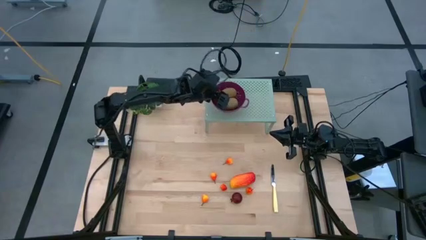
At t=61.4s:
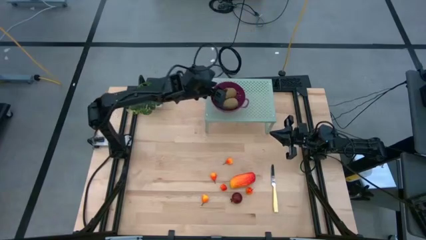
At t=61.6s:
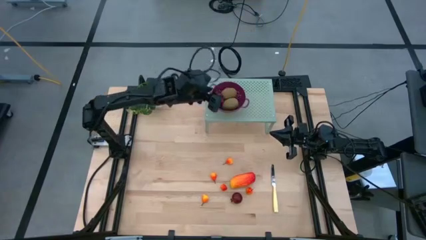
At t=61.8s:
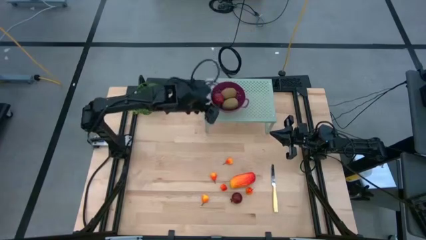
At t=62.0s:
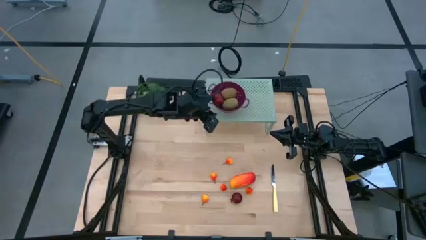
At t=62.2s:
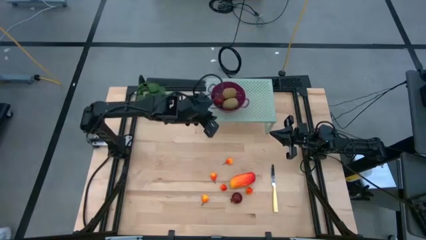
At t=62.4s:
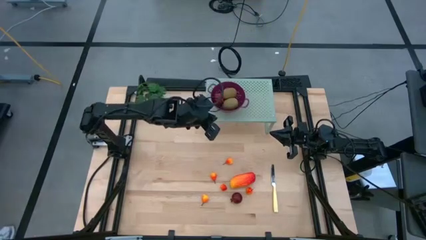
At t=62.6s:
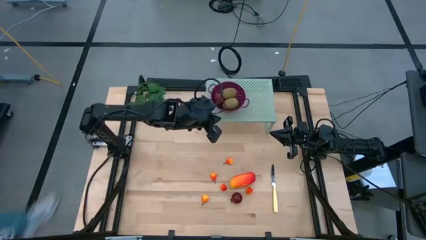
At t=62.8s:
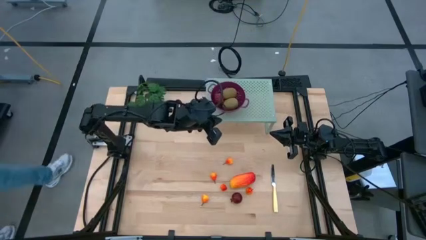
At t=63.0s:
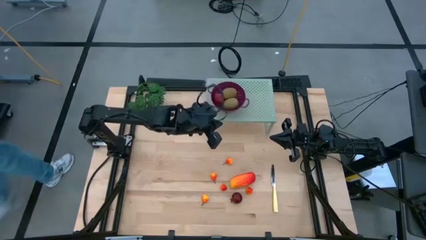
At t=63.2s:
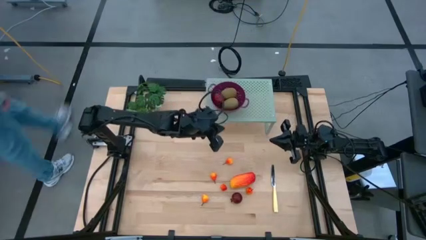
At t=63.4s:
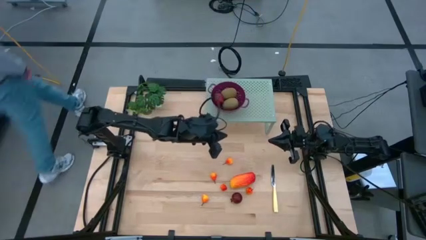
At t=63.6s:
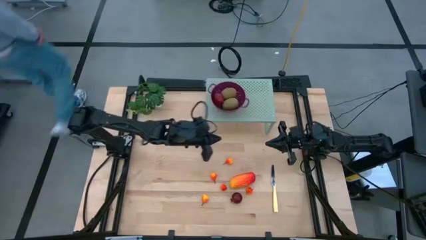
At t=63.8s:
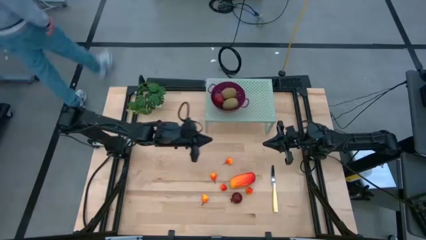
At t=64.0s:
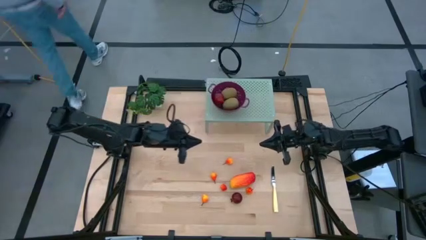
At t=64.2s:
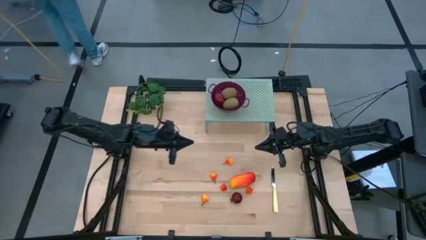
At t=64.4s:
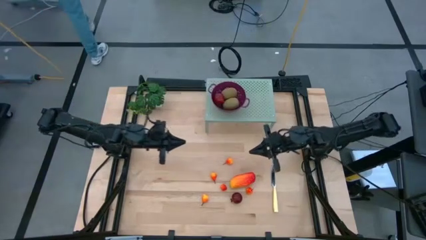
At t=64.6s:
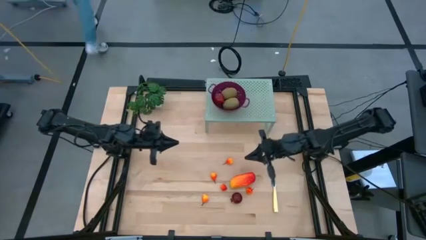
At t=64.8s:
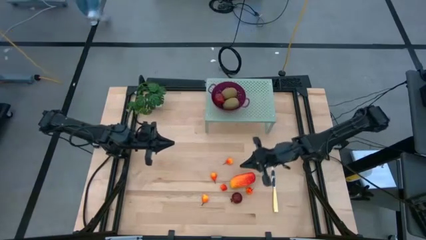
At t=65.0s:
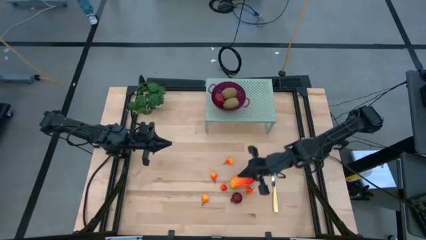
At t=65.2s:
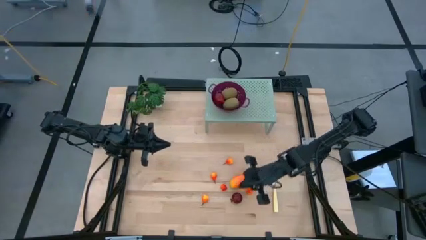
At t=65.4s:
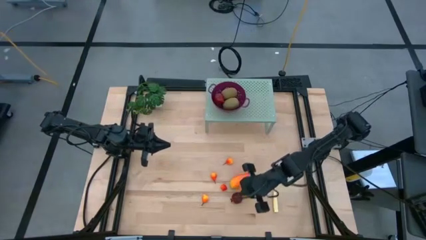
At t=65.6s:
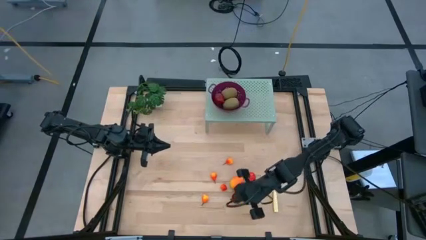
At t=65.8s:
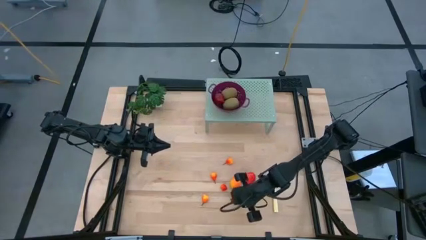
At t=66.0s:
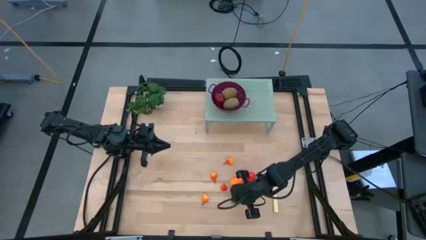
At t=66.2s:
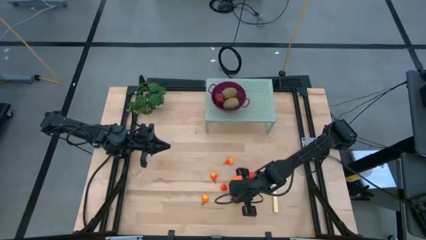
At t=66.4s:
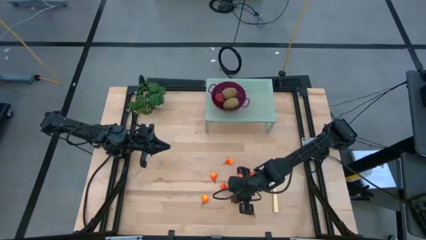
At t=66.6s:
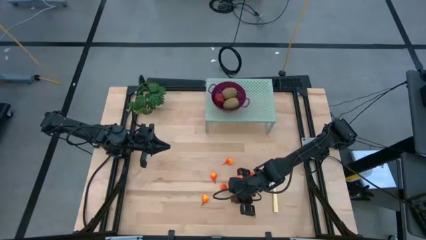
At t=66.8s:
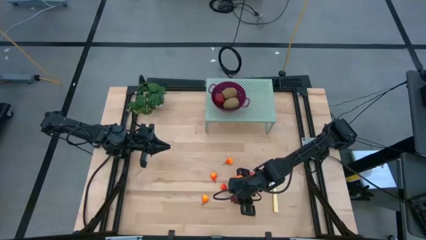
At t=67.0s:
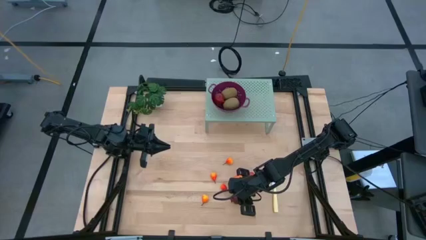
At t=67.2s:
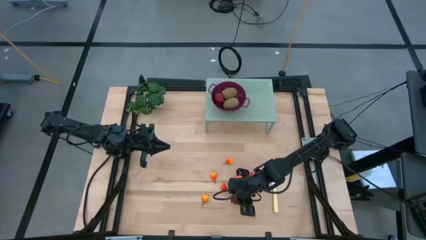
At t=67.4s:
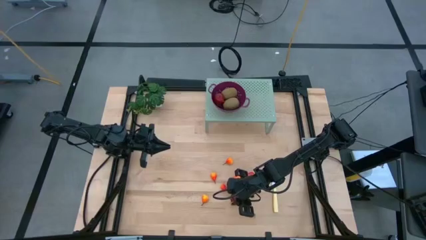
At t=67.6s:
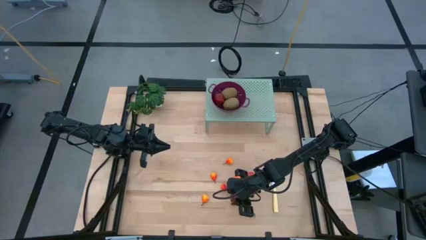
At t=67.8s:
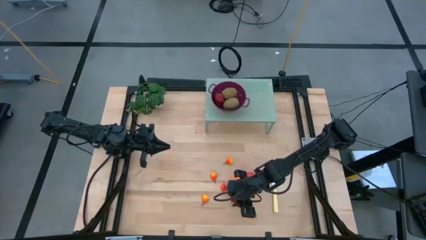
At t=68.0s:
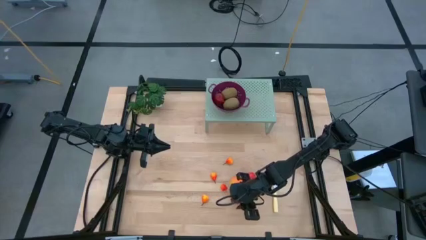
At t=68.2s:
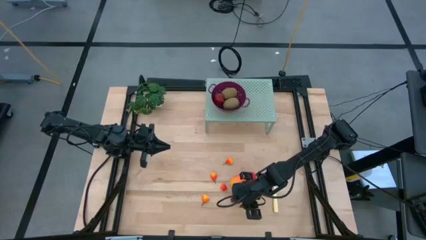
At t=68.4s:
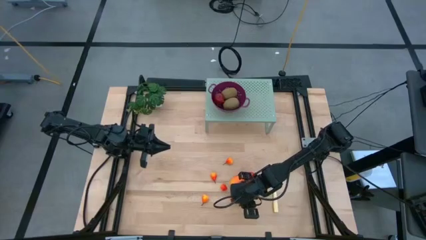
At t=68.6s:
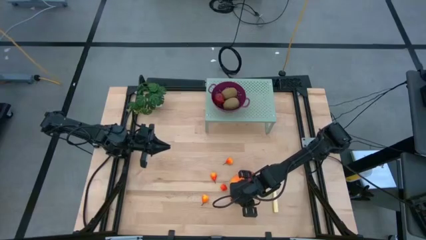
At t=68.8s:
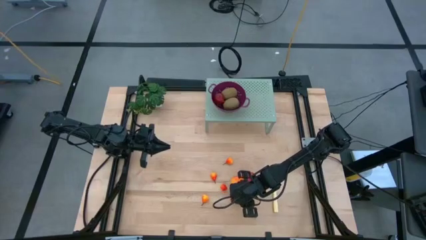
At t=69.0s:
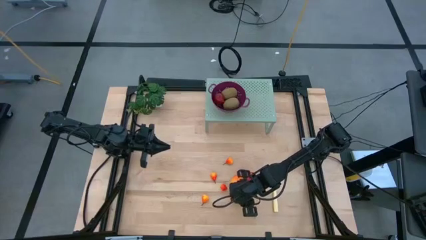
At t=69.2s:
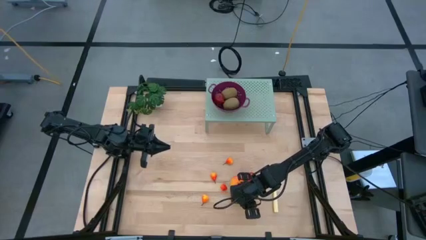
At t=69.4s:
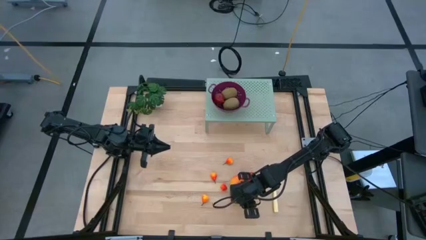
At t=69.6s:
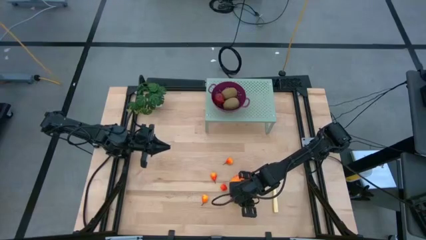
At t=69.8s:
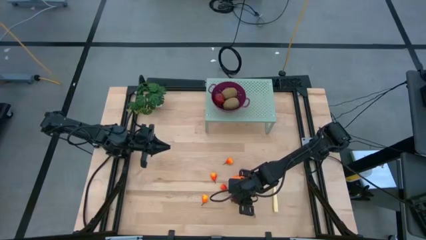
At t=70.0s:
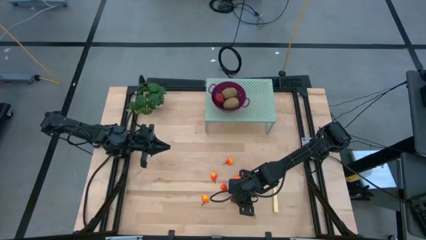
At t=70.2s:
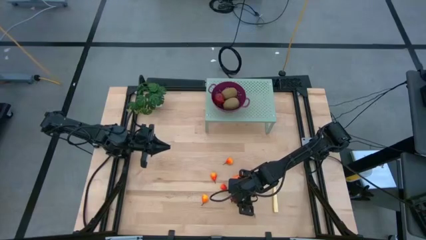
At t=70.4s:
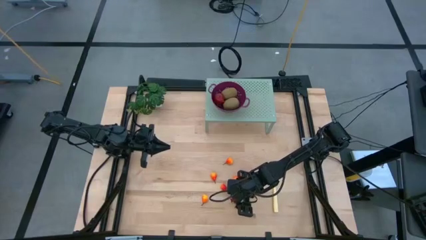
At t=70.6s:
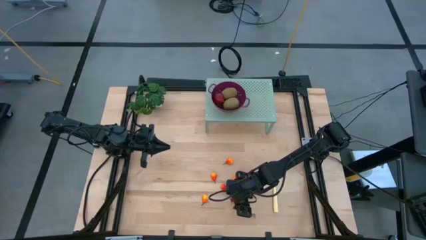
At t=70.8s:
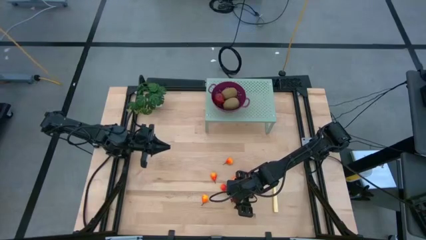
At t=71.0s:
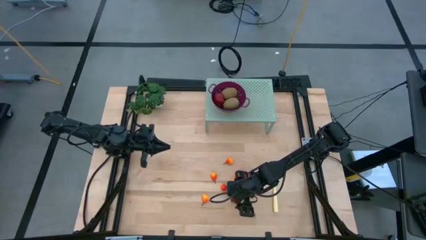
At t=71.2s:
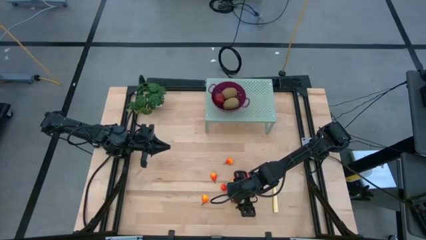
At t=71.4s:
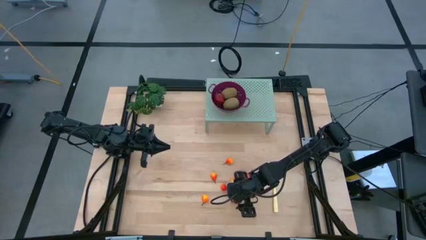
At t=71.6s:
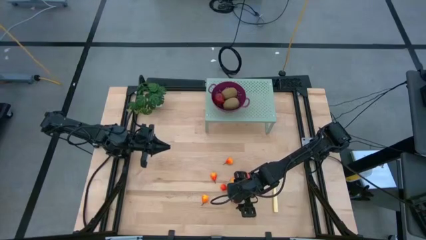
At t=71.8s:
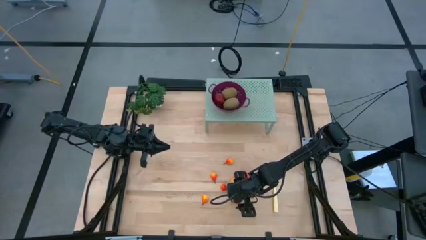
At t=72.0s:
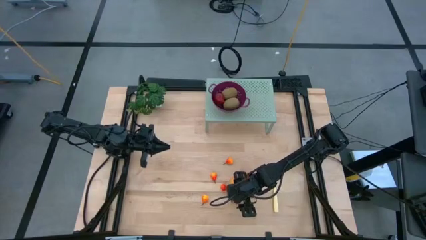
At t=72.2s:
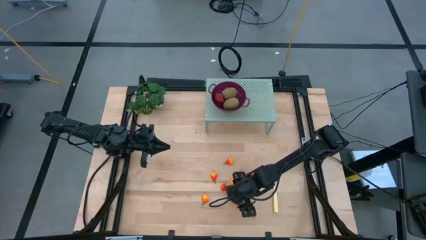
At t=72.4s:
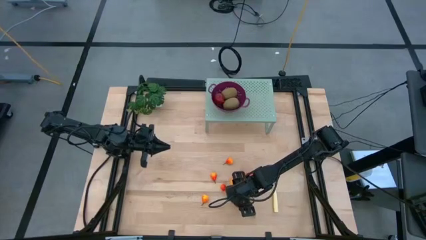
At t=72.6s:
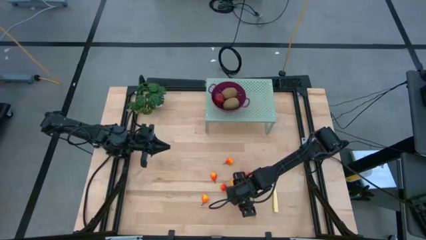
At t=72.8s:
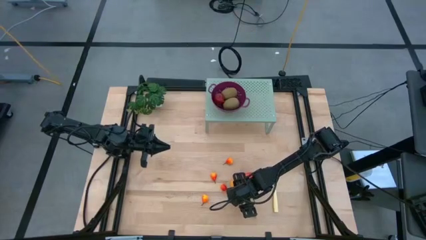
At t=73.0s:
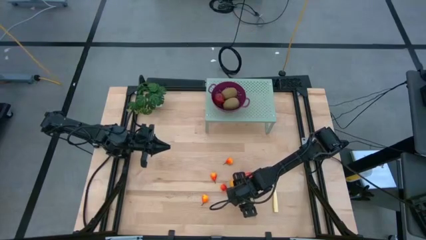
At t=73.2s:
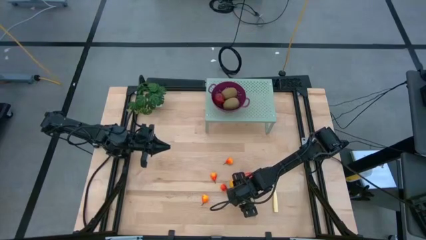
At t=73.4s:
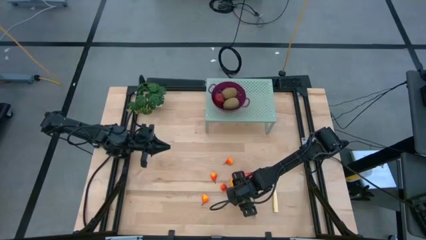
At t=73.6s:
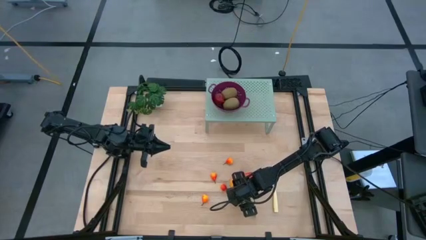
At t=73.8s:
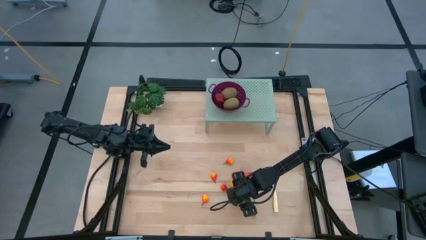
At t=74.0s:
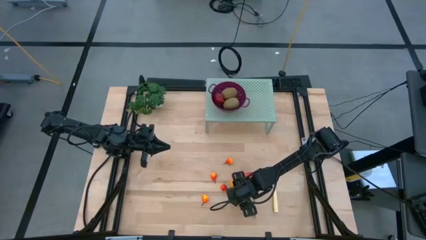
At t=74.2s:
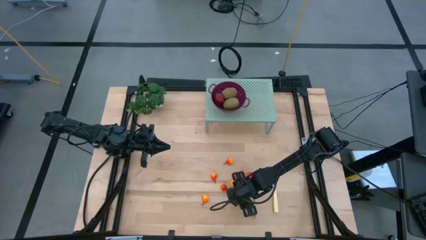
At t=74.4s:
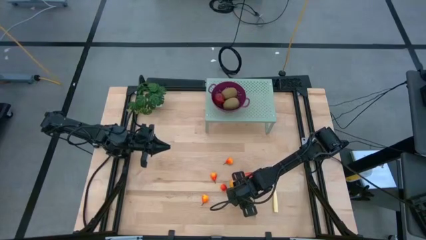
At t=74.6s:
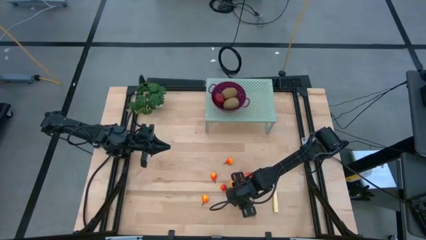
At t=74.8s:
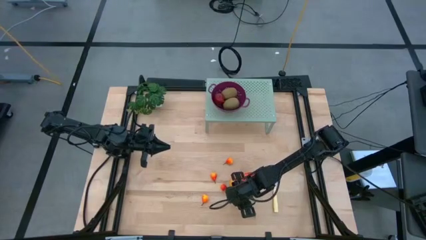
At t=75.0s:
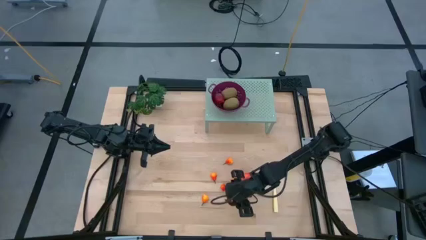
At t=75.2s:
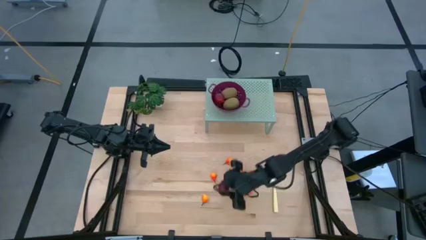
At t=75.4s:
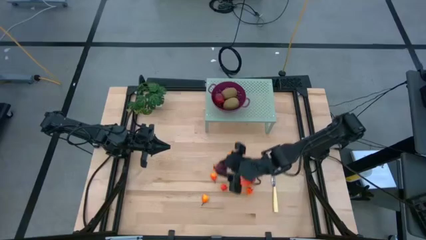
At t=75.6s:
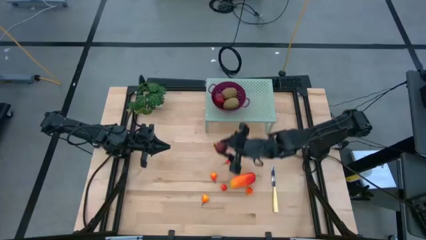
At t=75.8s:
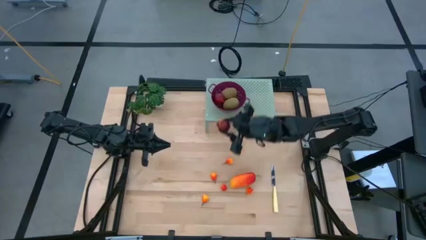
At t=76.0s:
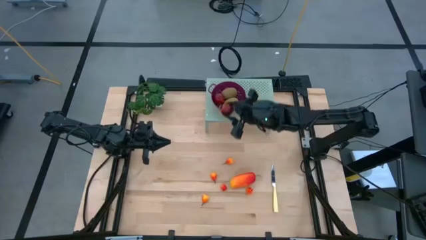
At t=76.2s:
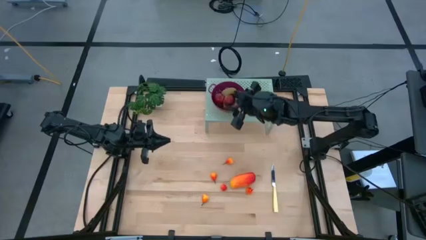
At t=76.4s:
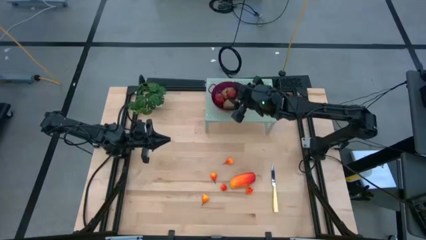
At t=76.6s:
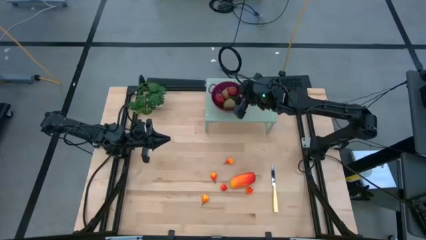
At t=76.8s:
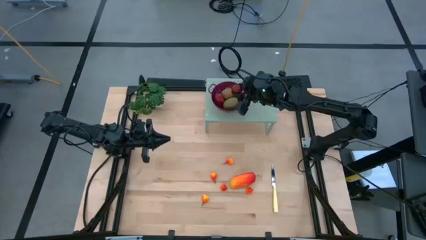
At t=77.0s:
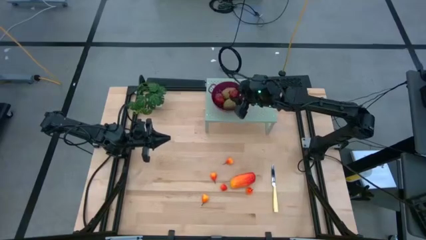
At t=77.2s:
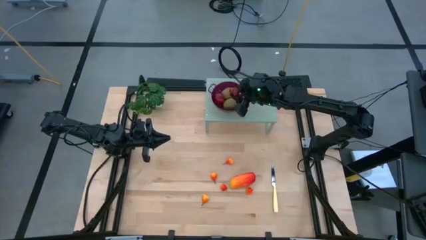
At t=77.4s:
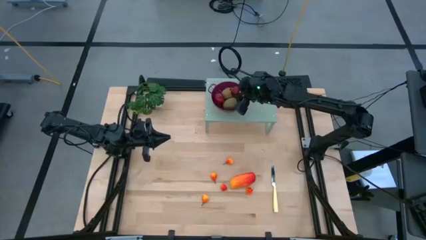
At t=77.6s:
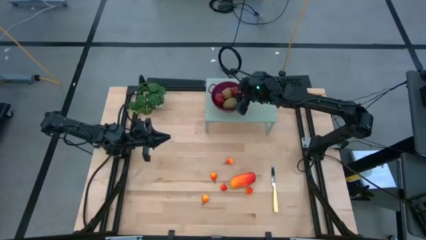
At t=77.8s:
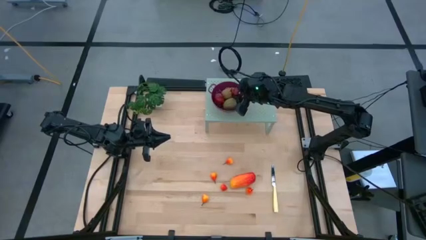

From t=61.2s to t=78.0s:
Task: Pick & Place Fruit
Put the pomegranate into the strainer bowl on the shelf
